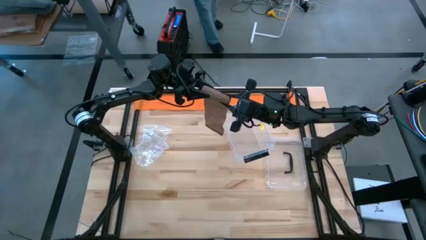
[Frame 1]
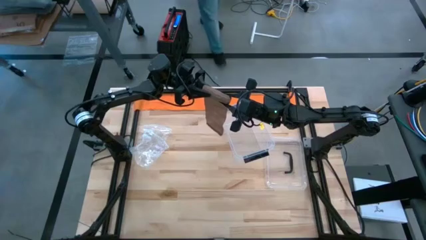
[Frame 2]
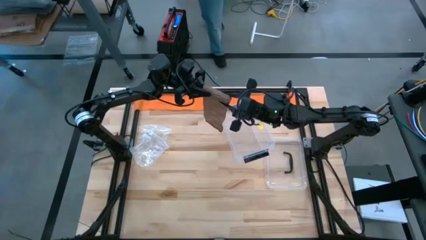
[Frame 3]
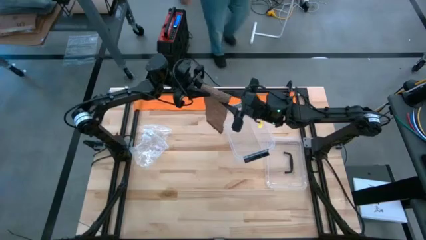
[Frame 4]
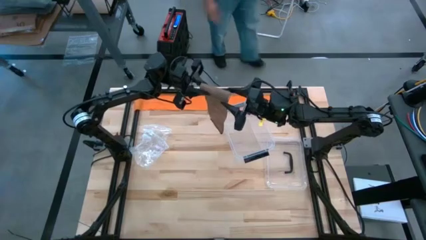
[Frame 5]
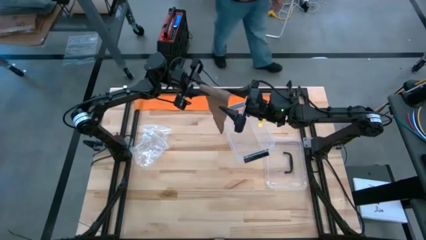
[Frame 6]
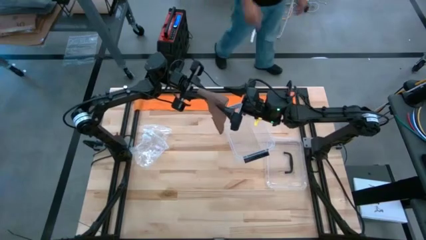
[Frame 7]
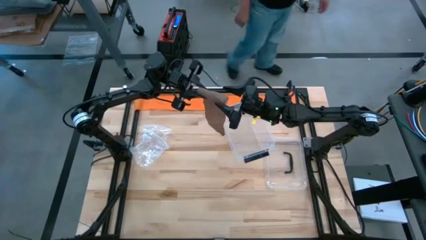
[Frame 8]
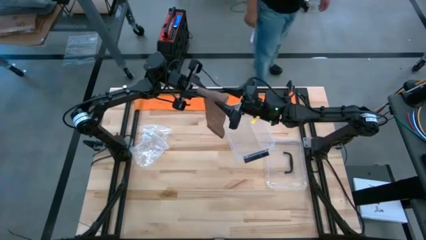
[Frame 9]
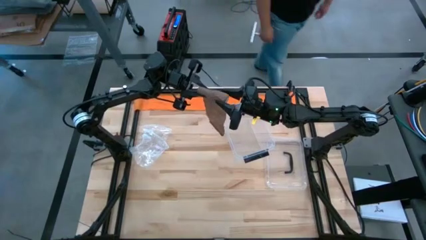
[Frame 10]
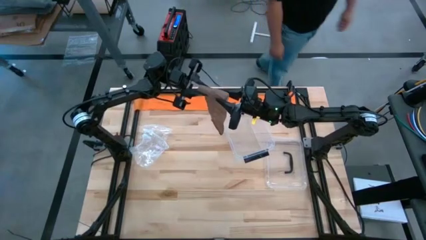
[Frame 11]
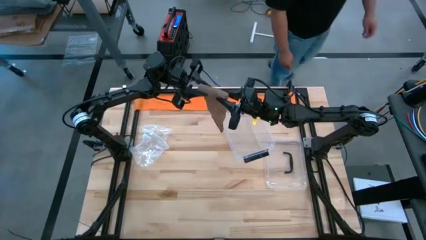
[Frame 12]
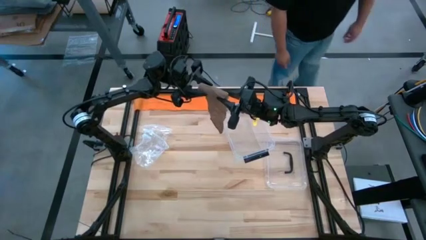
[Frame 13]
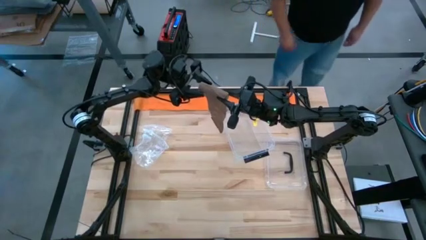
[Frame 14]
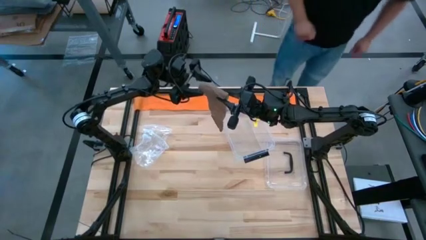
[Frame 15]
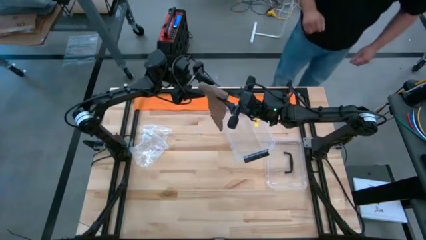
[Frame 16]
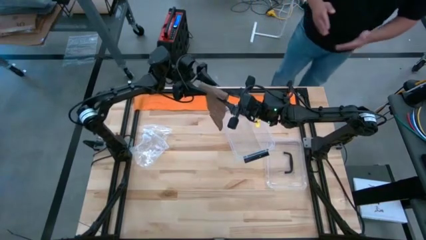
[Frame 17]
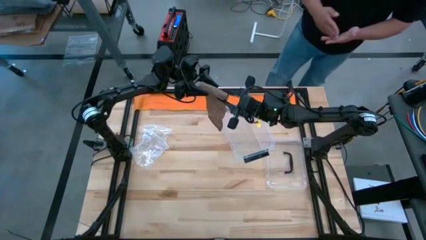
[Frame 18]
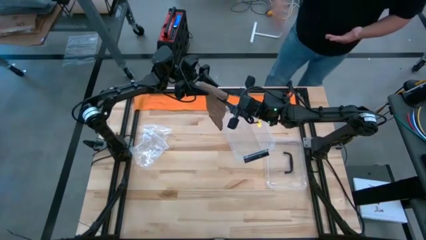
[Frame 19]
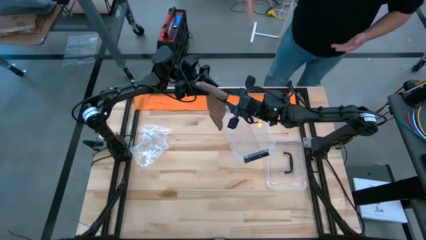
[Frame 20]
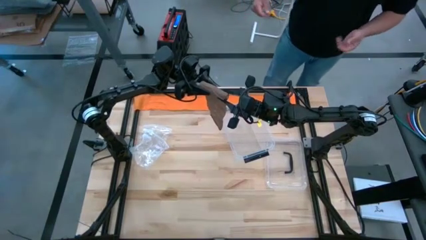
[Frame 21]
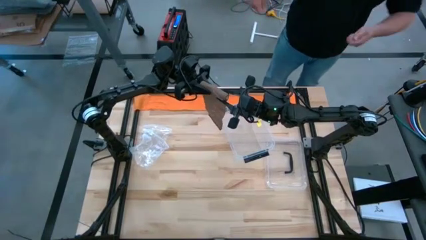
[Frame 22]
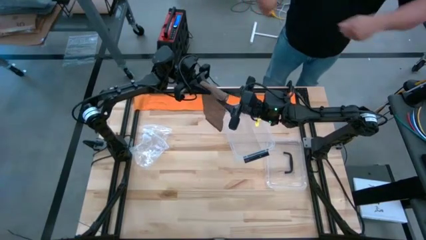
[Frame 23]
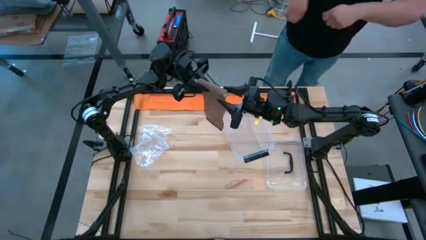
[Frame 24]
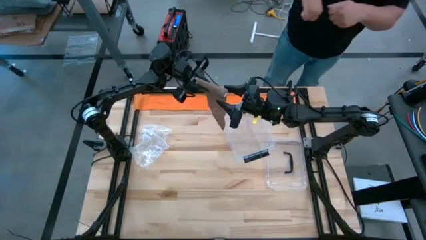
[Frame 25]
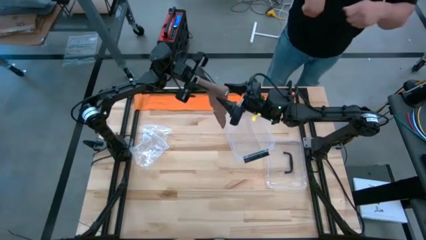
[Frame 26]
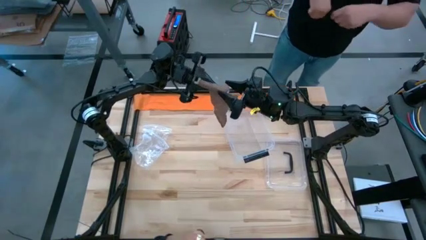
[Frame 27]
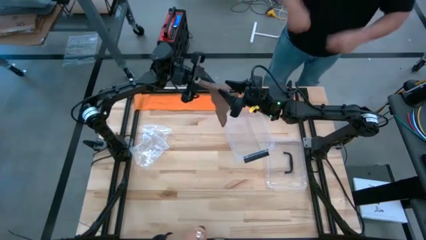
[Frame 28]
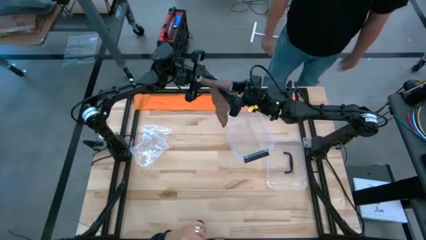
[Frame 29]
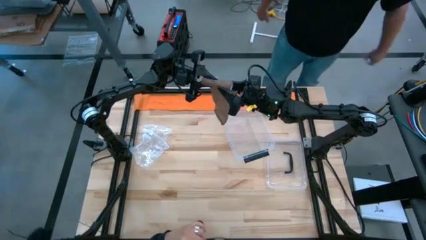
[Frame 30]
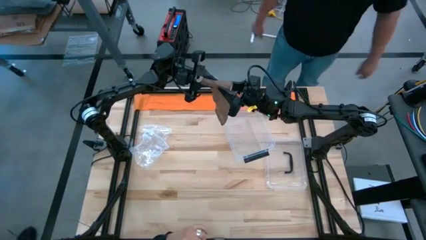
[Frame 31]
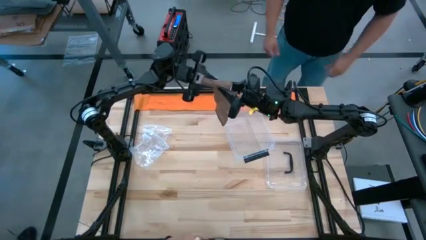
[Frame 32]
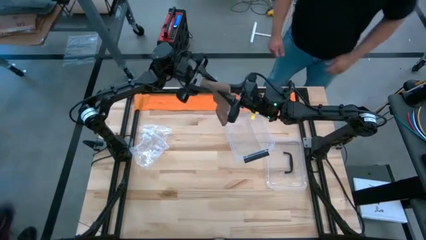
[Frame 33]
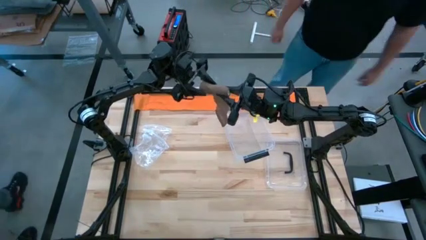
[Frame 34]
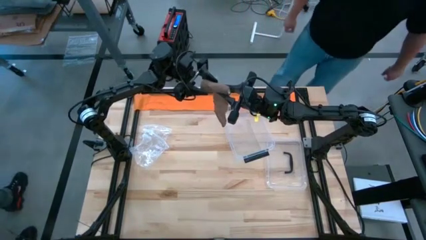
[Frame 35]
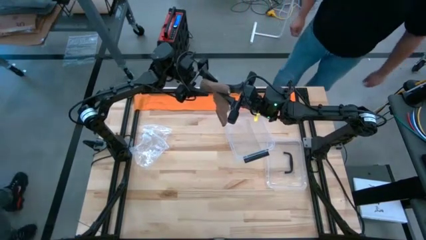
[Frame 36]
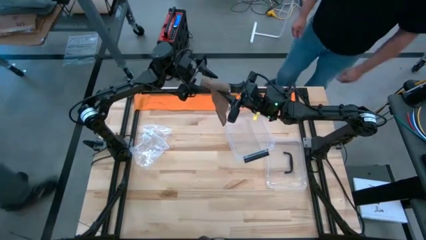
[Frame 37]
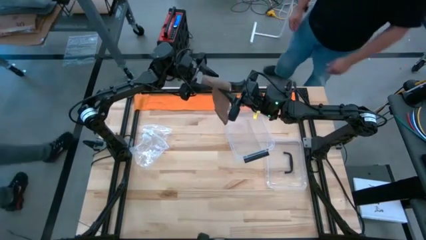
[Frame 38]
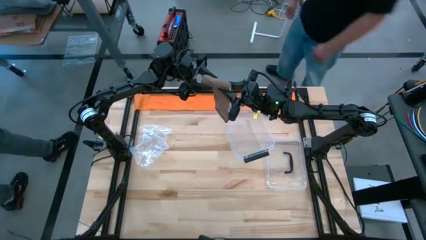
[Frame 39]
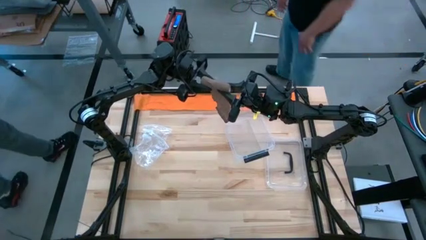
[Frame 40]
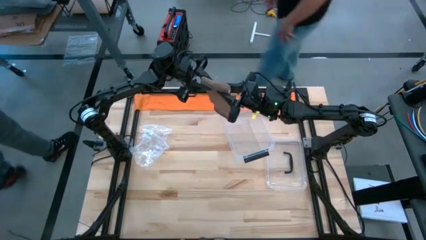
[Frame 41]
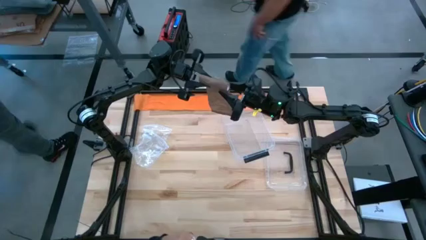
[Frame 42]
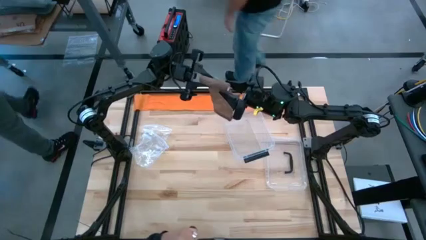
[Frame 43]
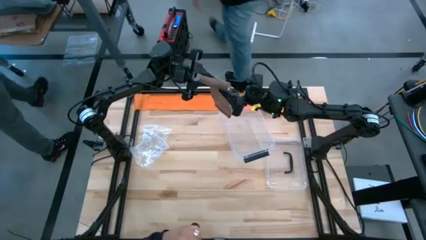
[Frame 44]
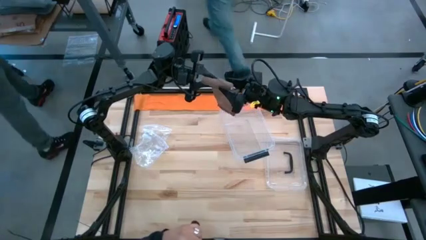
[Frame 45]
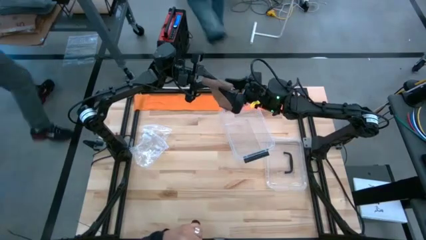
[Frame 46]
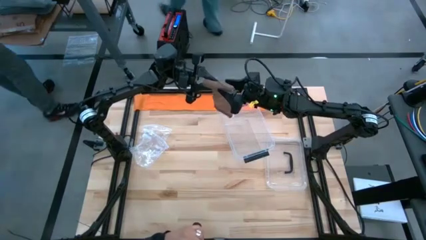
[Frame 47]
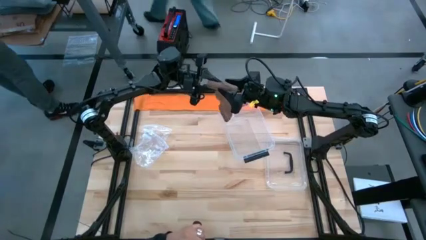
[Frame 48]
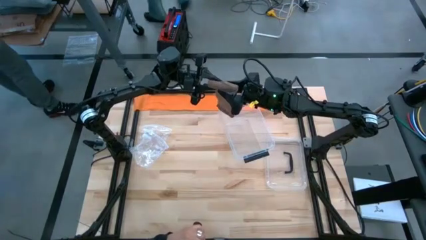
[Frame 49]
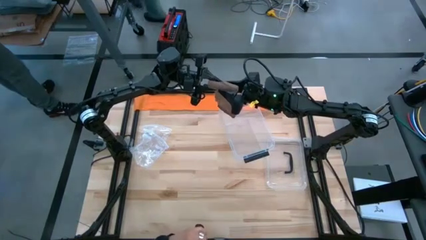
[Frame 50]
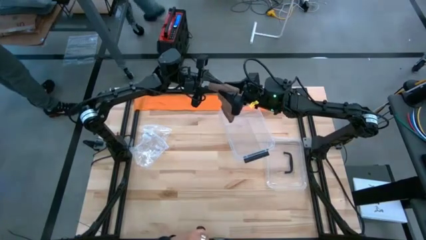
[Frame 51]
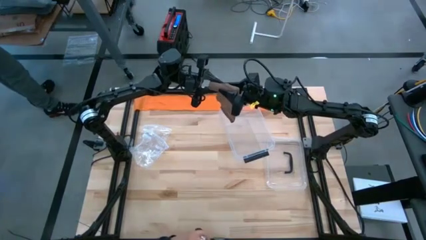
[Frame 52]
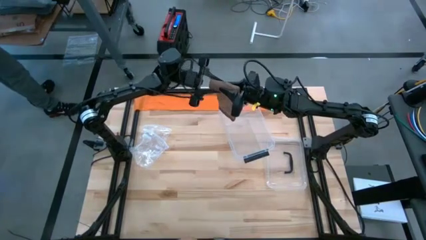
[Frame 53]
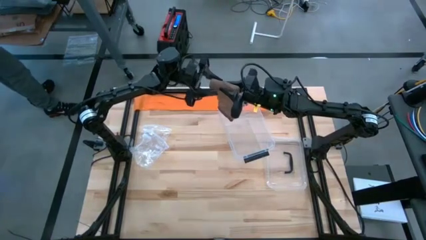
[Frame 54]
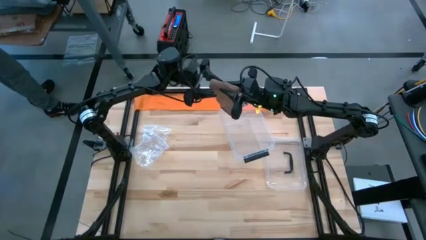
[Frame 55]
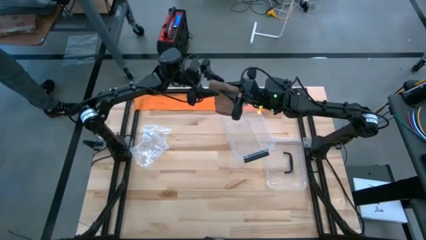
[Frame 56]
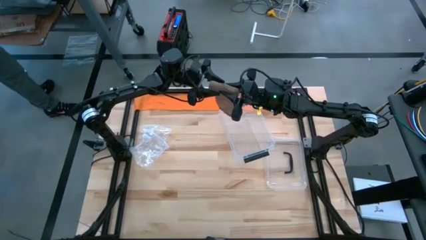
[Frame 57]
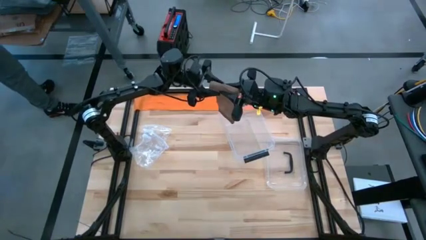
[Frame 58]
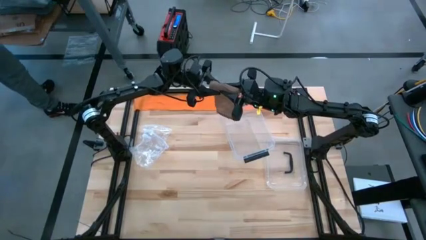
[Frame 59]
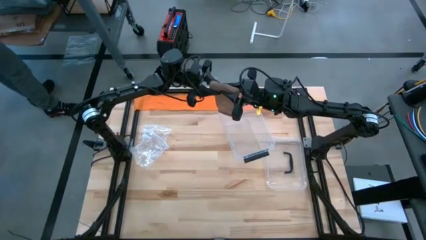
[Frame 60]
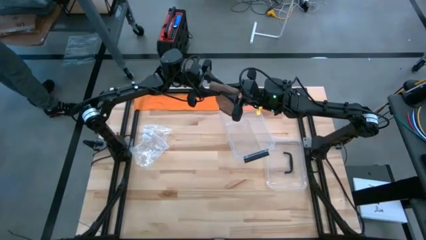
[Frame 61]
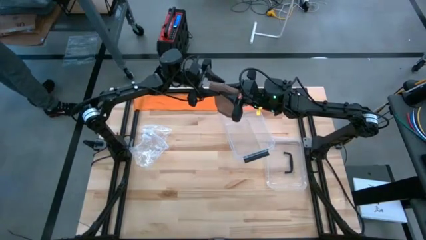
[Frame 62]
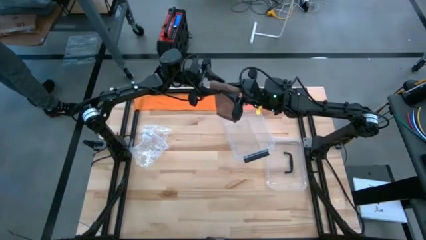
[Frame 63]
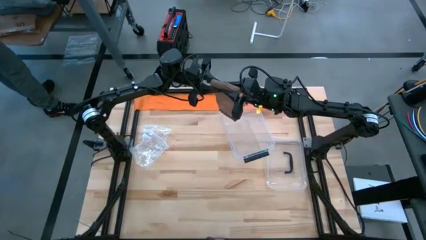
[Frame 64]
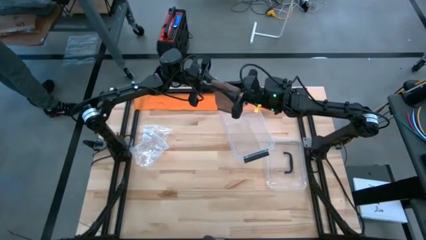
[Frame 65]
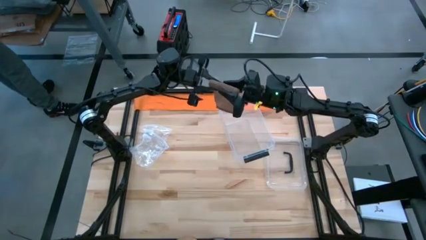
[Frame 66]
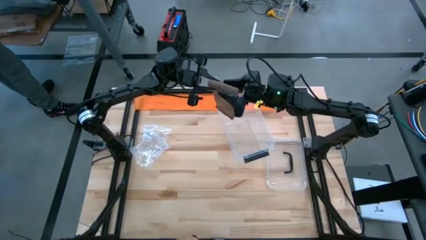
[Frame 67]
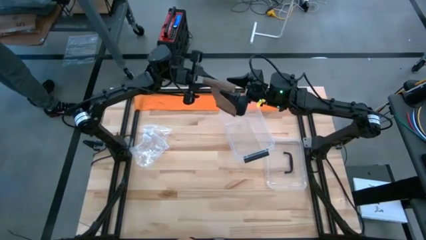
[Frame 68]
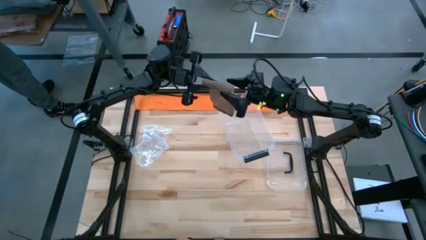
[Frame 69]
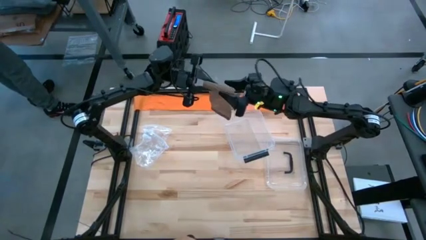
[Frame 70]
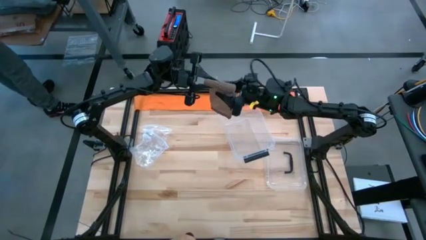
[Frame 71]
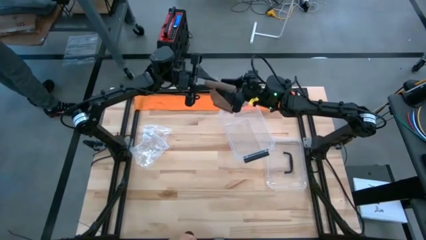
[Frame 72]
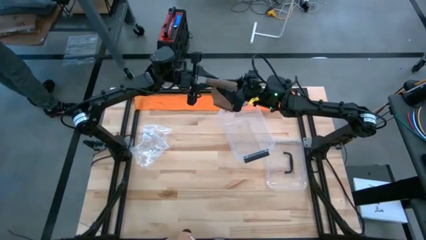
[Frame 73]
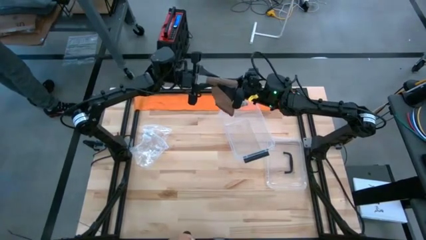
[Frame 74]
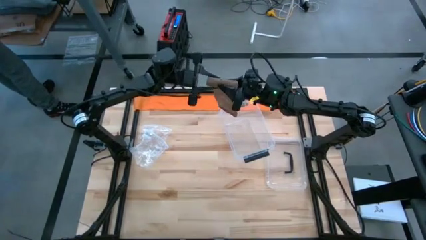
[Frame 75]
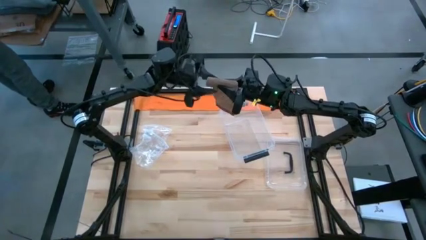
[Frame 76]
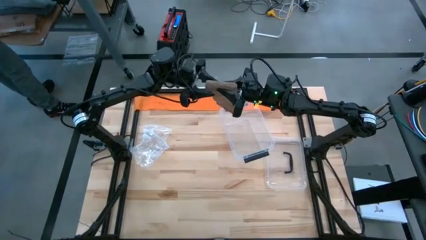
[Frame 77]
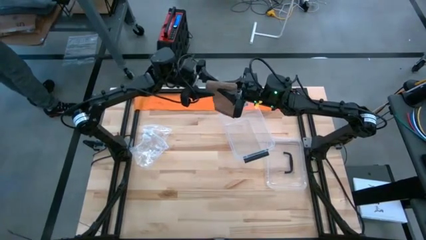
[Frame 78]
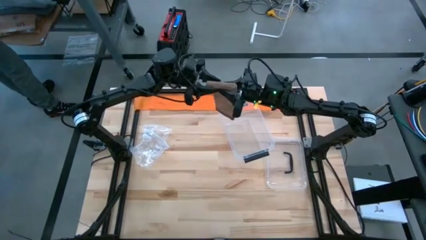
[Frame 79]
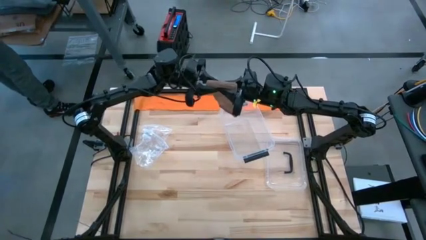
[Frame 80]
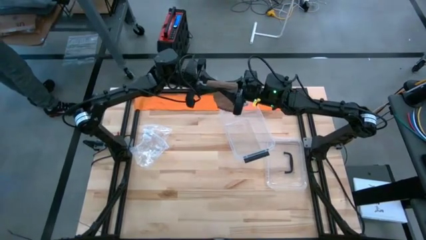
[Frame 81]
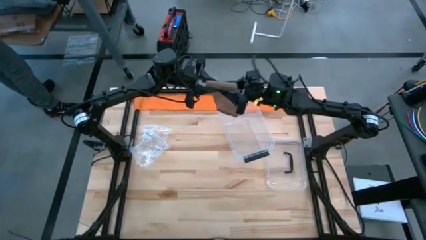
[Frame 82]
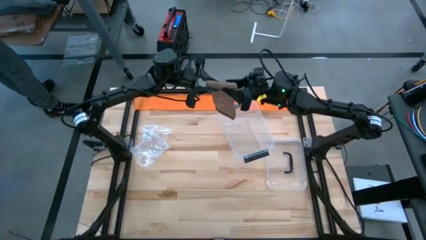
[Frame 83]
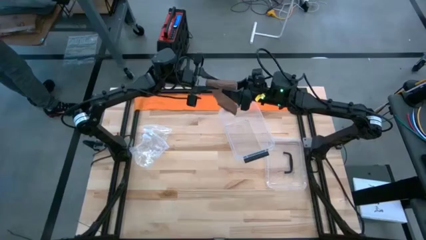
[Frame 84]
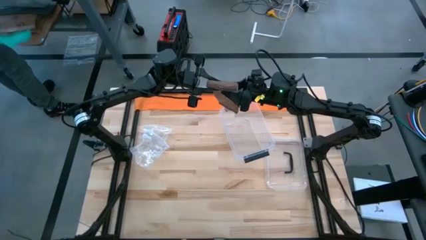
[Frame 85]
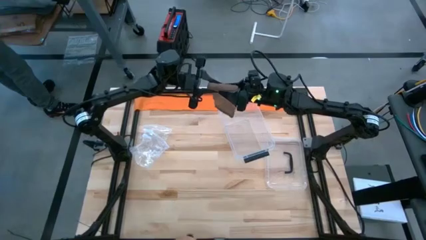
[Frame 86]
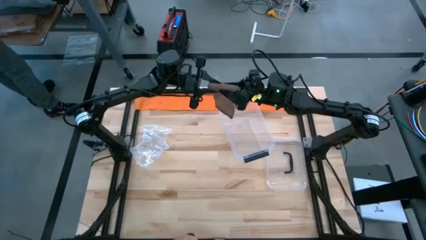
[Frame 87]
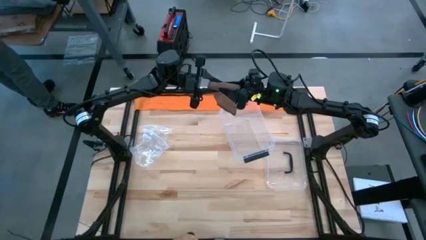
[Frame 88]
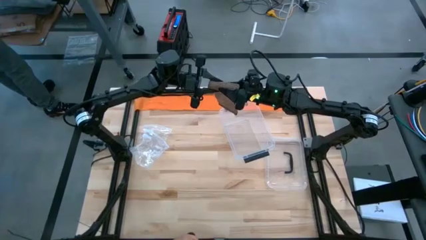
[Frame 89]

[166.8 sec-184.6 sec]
Task: Roll bandage
Roll the brown bandage
